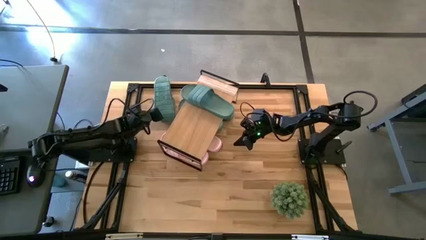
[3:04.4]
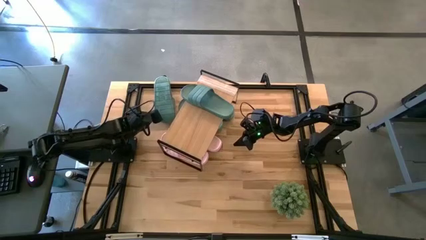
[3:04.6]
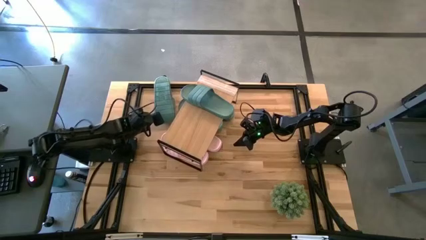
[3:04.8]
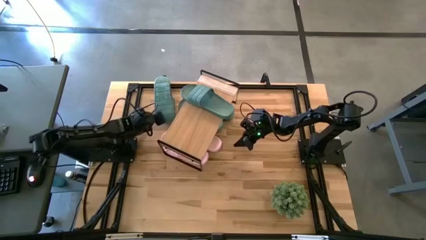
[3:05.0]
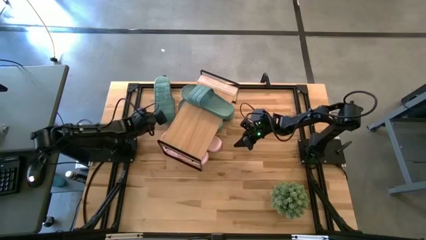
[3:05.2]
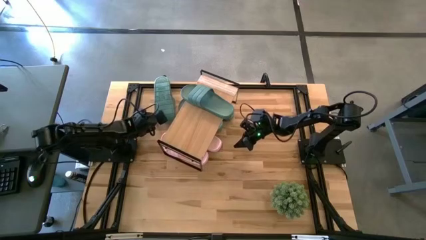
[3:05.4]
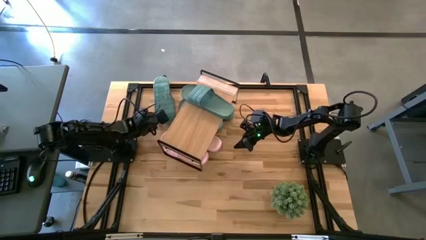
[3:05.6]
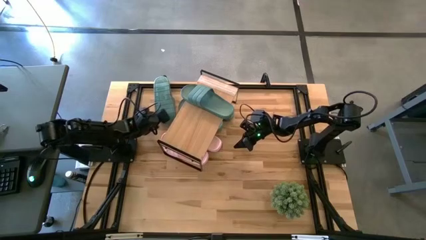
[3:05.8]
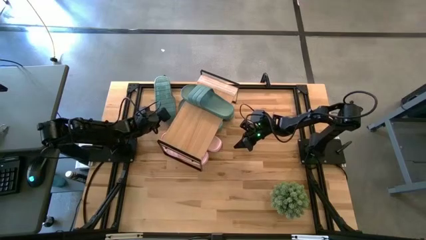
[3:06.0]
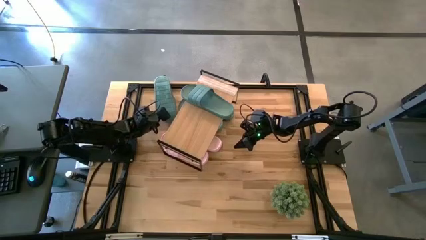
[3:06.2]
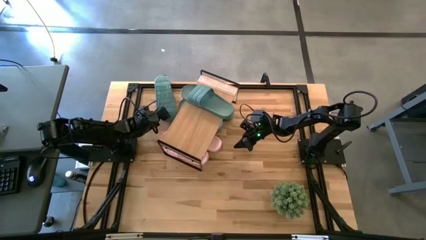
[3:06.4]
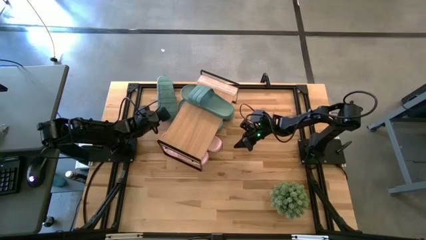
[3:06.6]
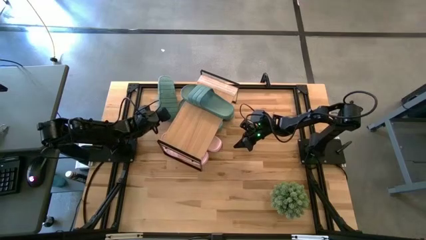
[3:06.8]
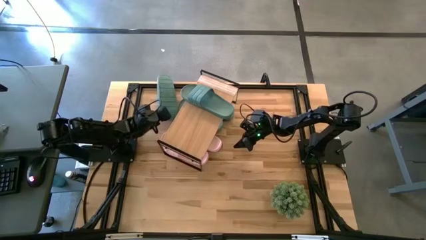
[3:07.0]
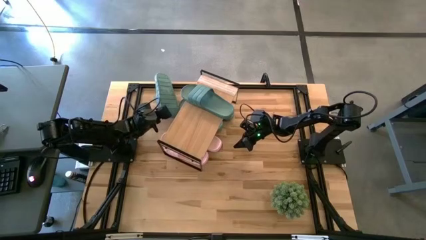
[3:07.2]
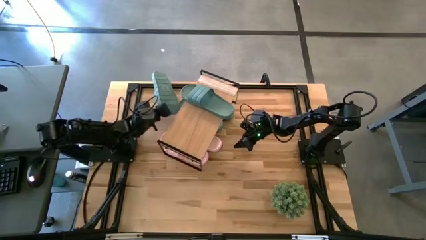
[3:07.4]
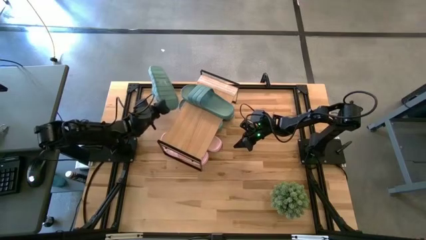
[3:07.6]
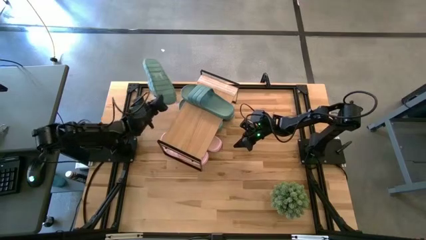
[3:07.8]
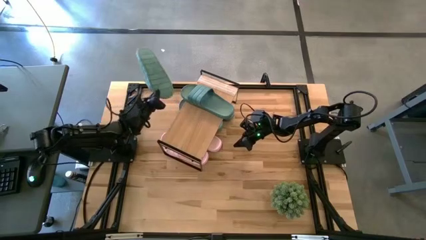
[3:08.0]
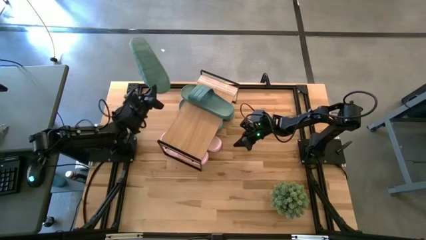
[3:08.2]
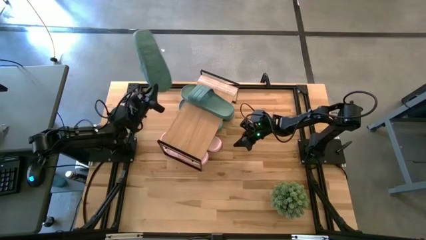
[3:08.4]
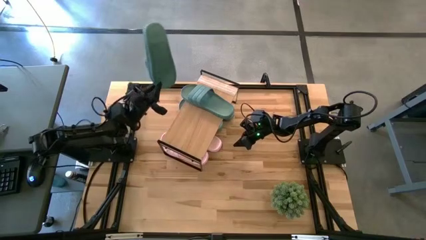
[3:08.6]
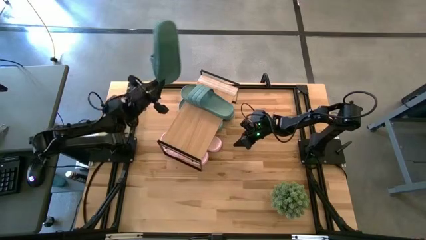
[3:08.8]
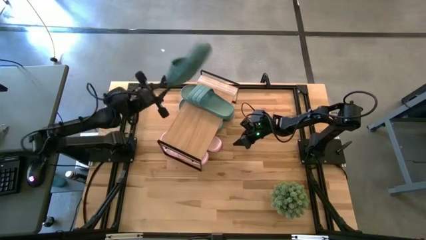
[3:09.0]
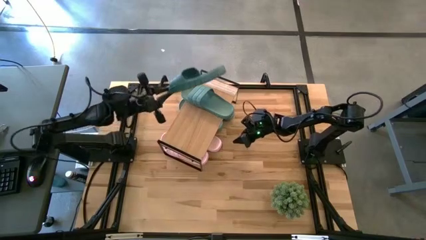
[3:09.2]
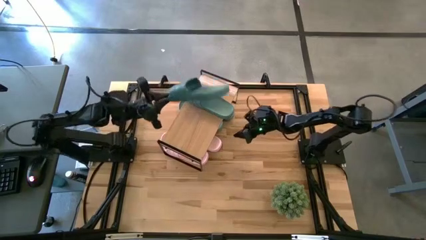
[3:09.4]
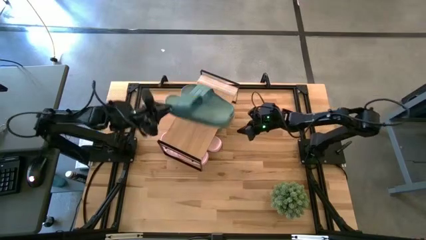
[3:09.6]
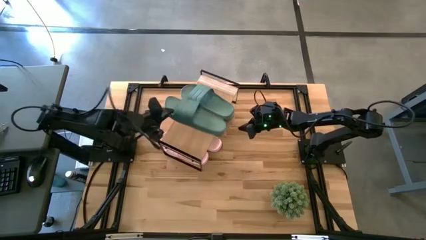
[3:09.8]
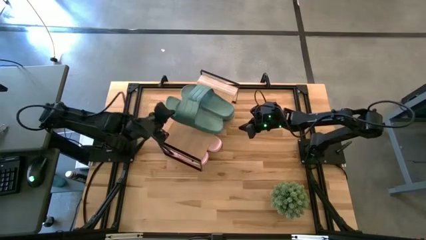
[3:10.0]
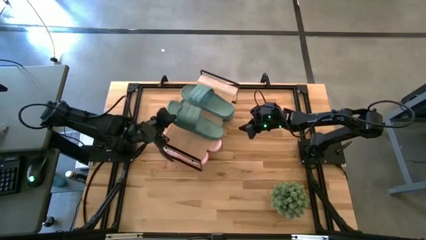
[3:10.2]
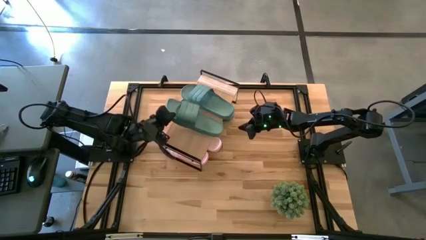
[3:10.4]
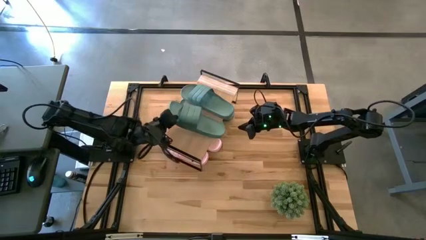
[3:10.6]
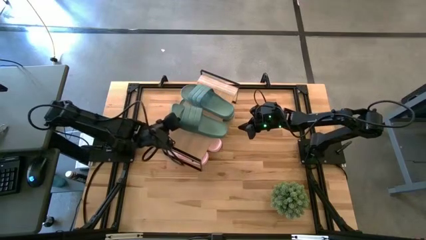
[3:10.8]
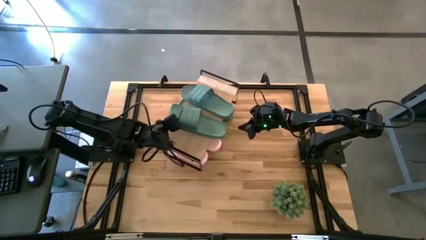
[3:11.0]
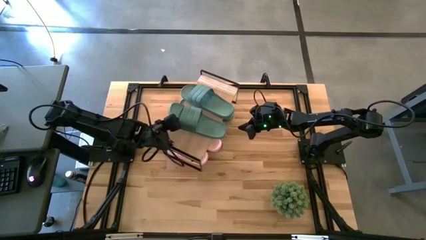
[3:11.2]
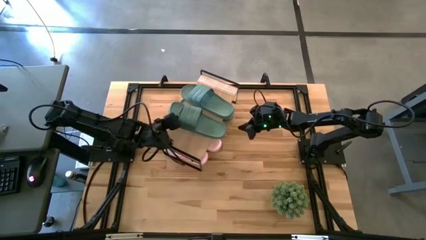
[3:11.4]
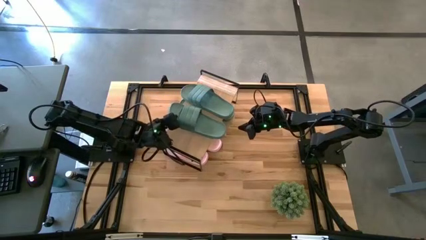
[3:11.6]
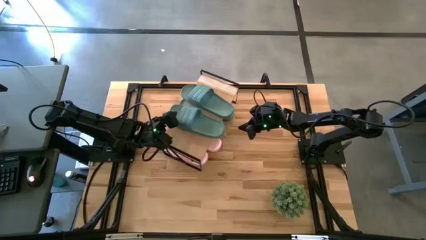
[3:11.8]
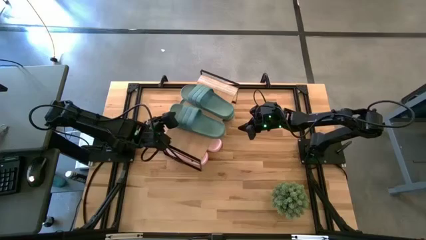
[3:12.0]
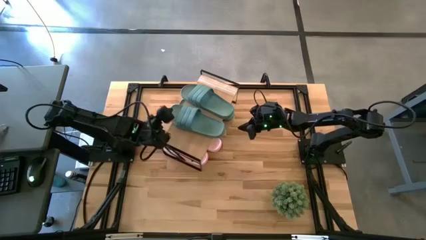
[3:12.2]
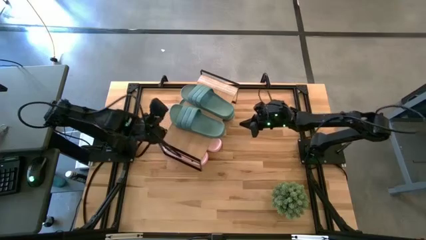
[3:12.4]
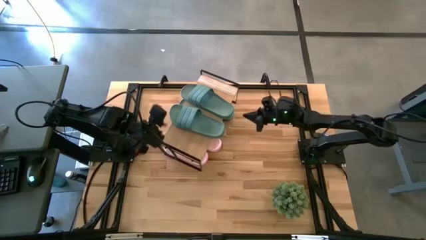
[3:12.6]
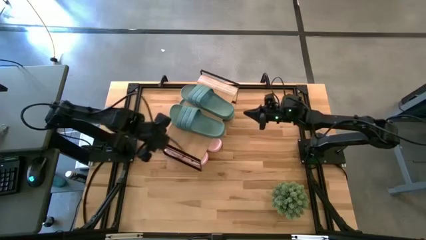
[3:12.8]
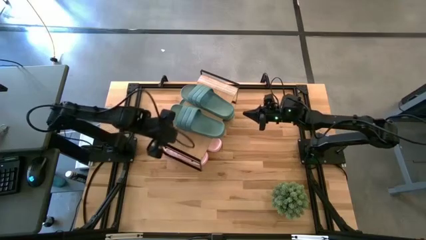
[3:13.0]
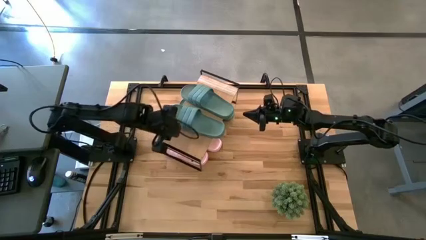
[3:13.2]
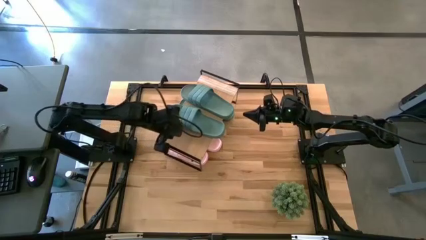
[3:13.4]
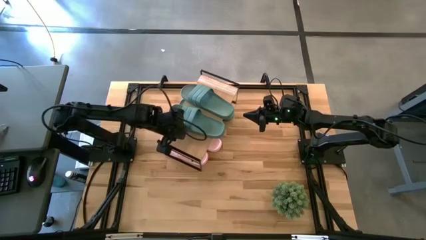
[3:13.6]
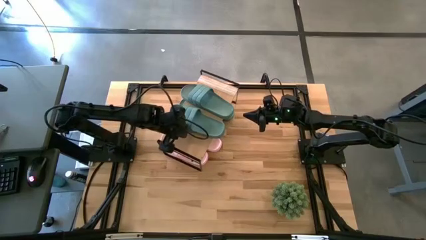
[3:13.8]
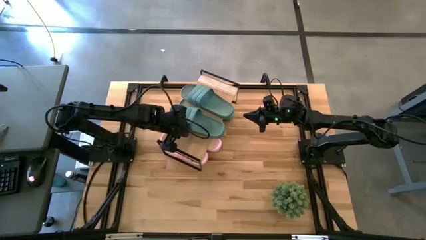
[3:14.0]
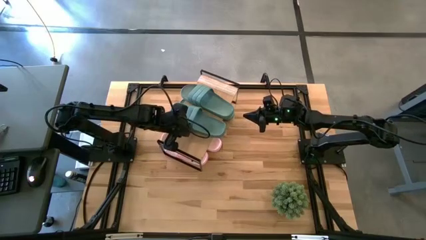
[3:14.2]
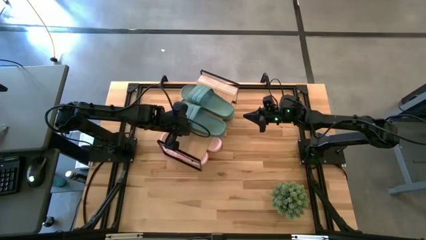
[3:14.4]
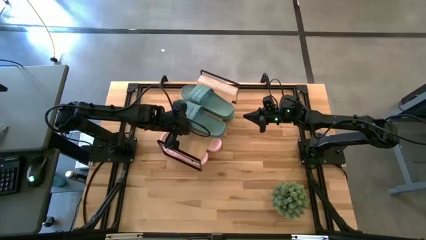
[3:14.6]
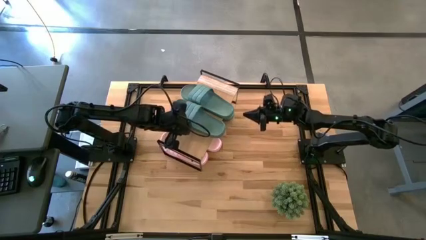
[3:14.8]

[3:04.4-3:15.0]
Task: Pick and place slides into the shelf
Put the green slide on the shelf

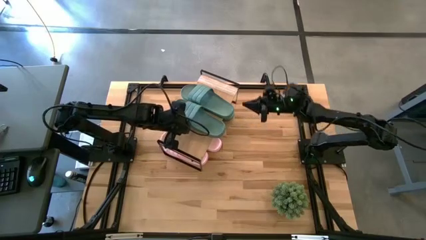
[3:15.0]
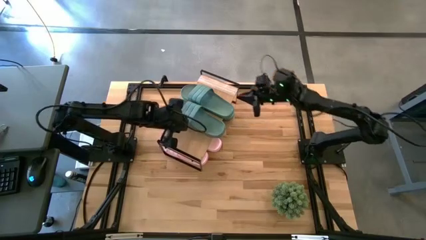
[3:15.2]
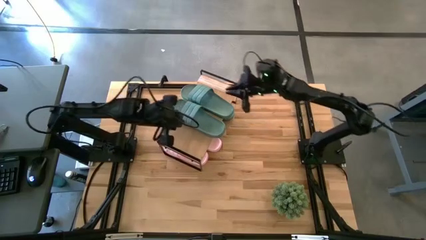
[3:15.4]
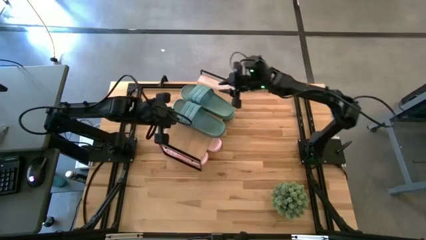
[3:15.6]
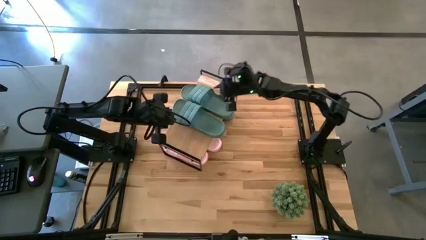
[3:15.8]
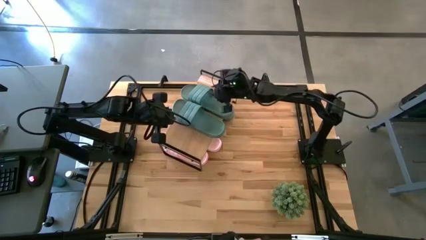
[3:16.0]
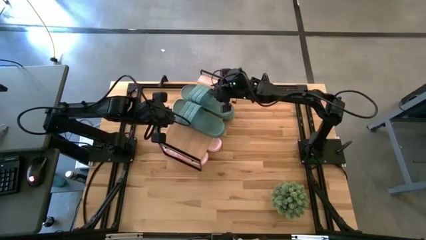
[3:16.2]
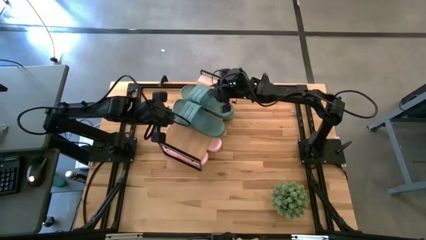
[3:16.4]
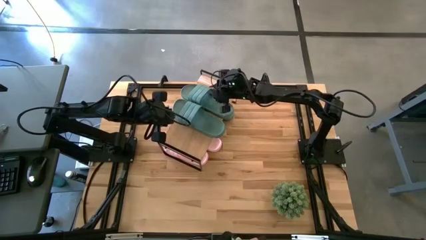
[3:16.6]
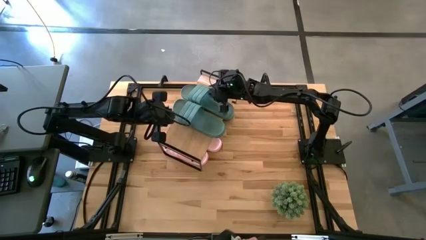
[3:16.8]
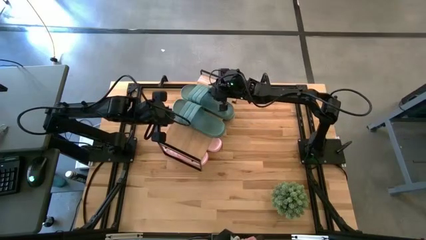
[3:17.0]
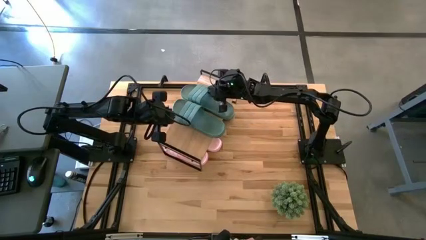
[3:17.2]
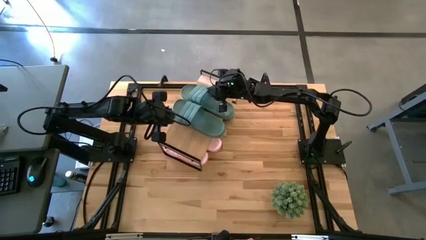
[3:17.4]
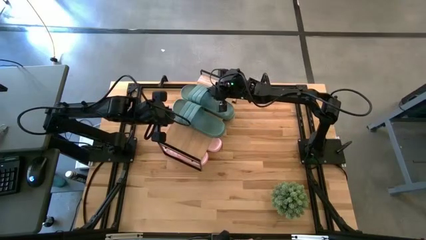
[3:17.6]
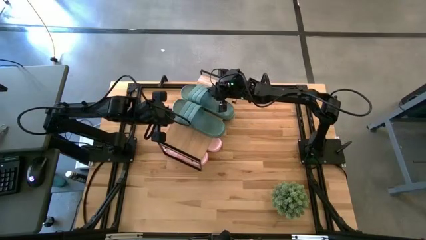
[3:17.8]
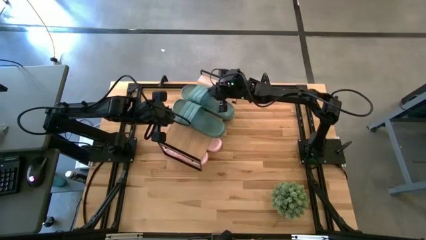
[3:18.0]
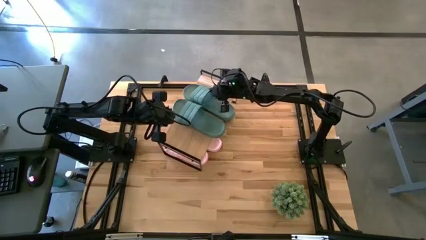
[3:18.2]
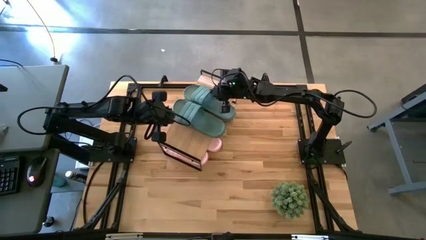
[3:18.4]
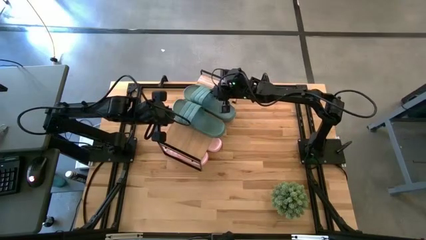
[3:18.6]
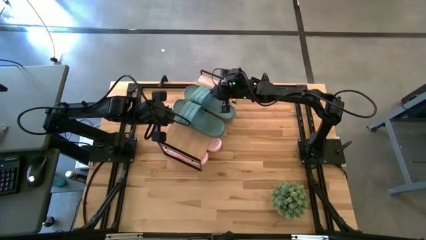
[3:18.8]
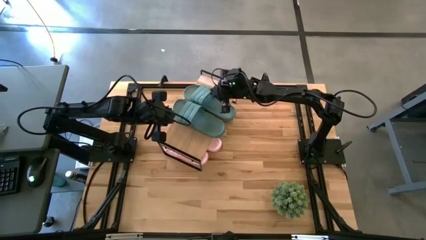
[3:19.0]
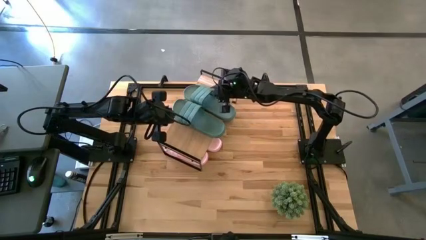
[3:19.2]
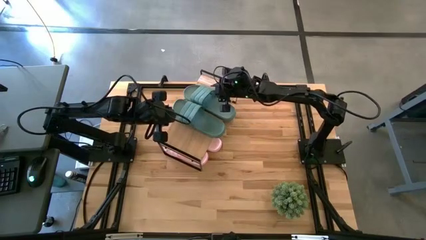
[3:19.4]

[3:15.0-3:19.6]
Adjust the top green slide on the shelf
